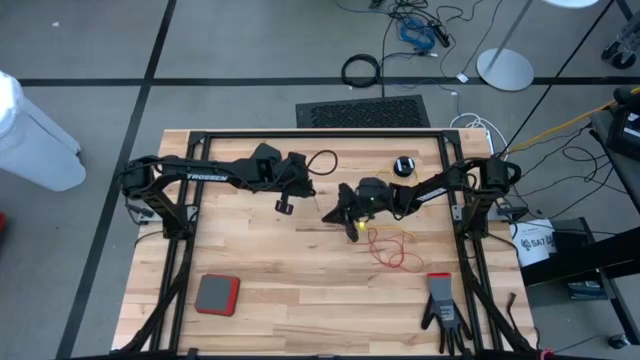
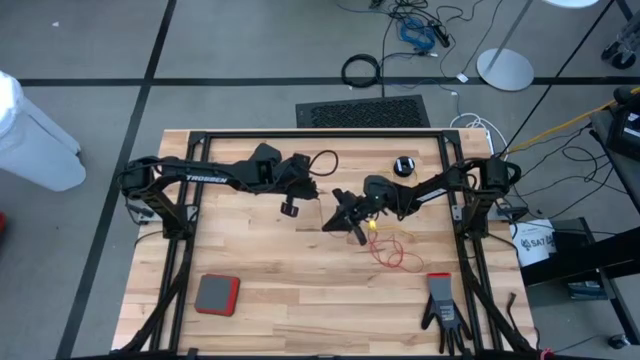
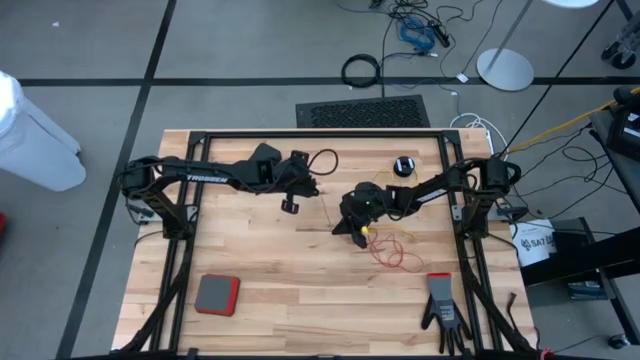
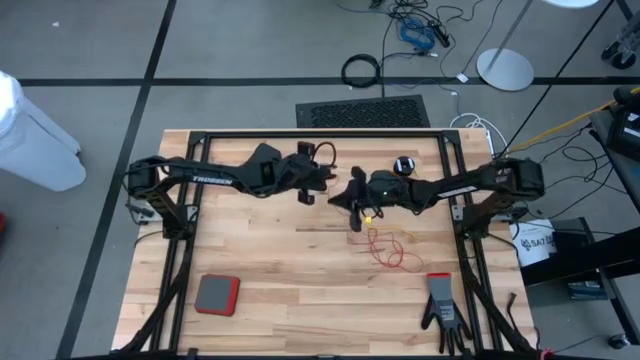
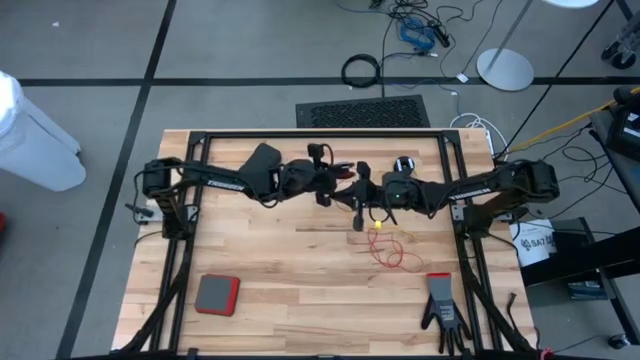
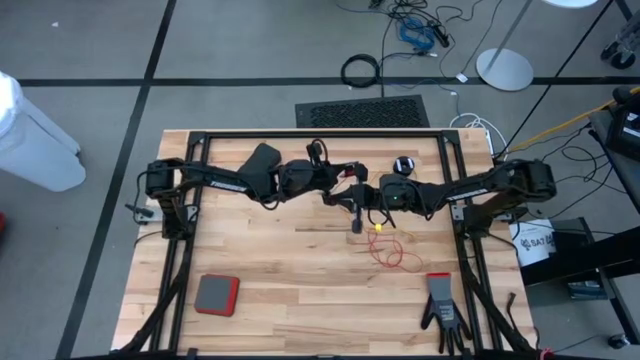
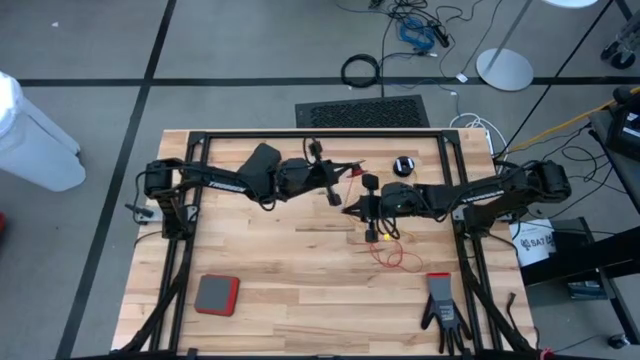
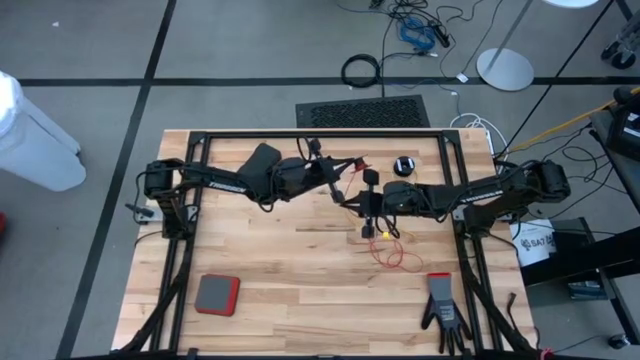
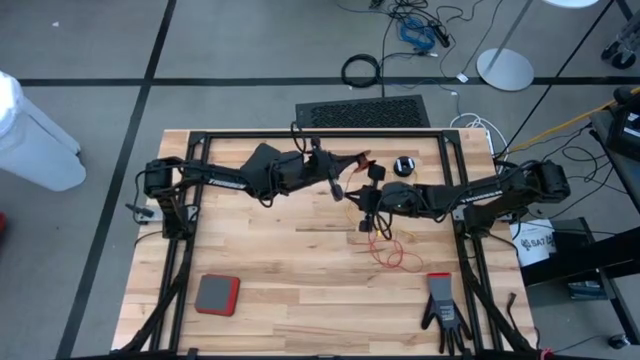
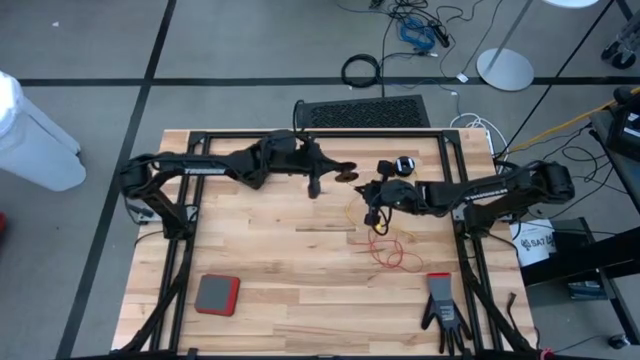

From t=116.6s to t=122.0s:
Task: Coil cords
Coil the red wire on the spool

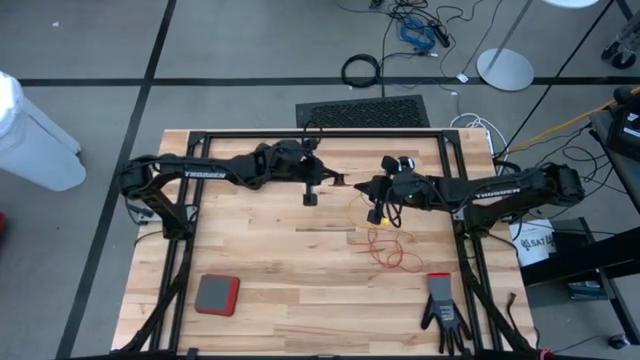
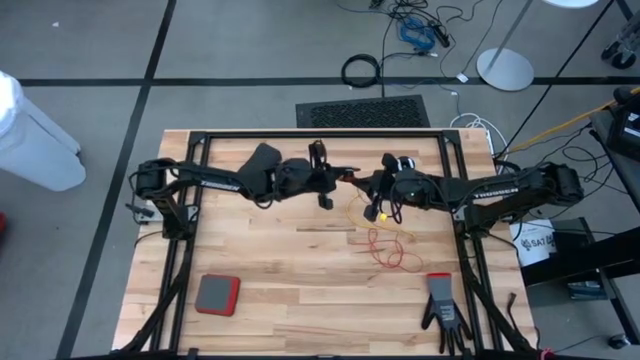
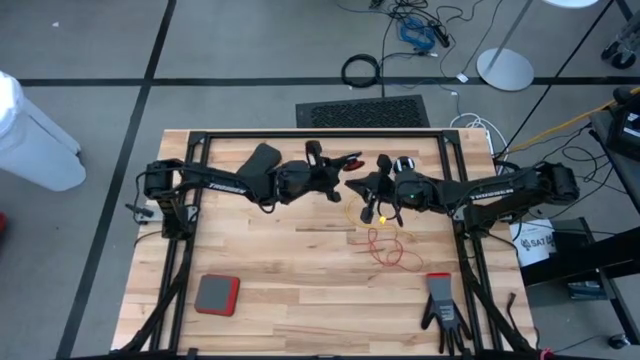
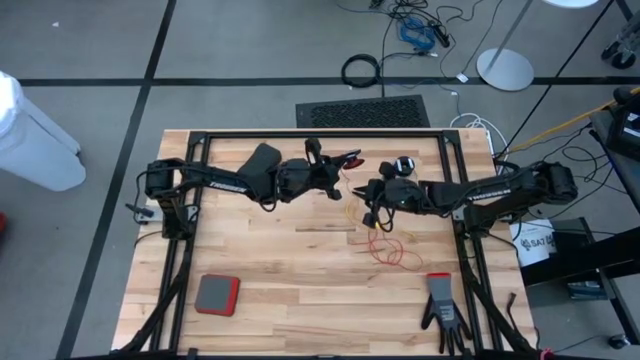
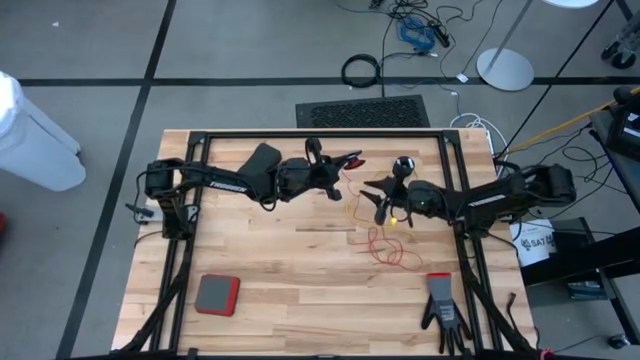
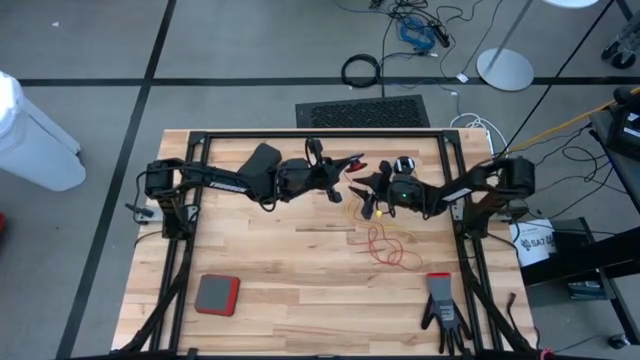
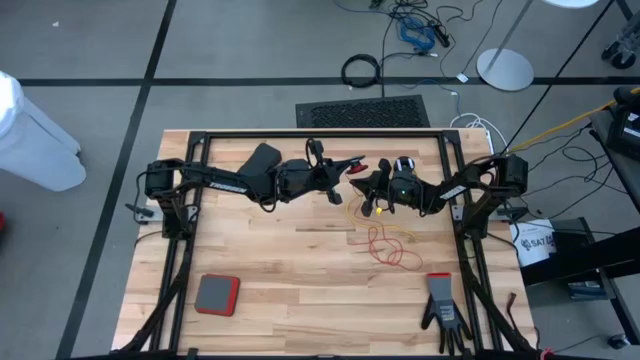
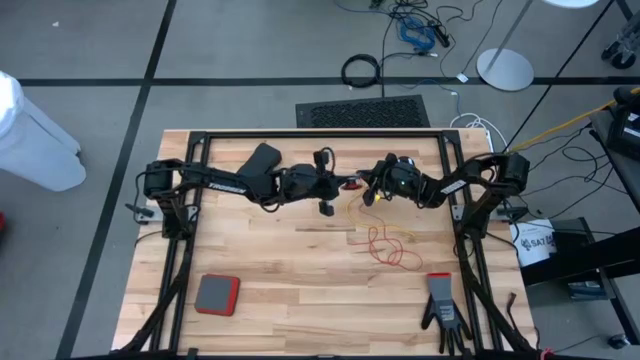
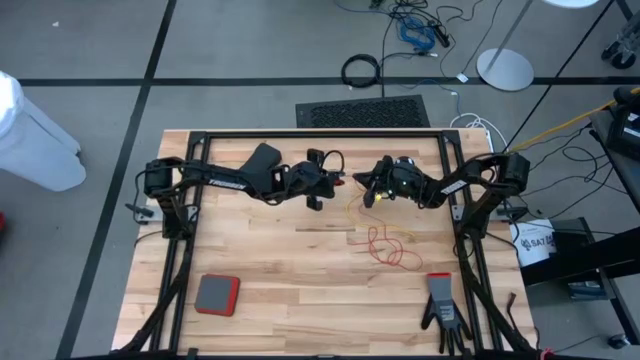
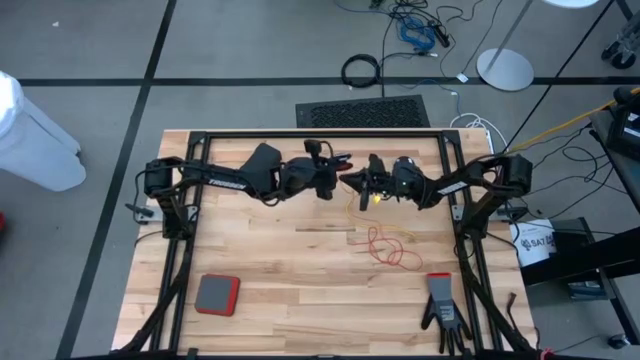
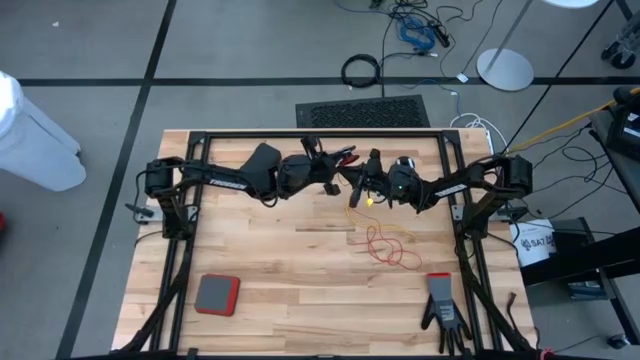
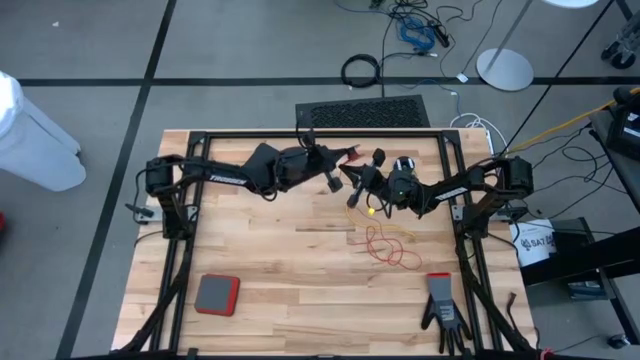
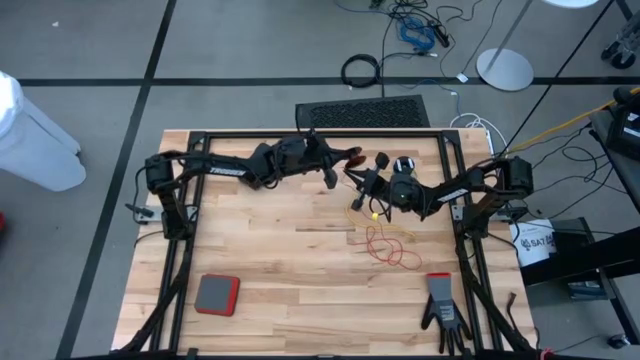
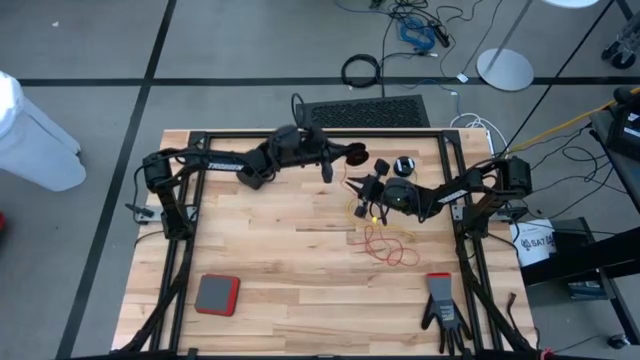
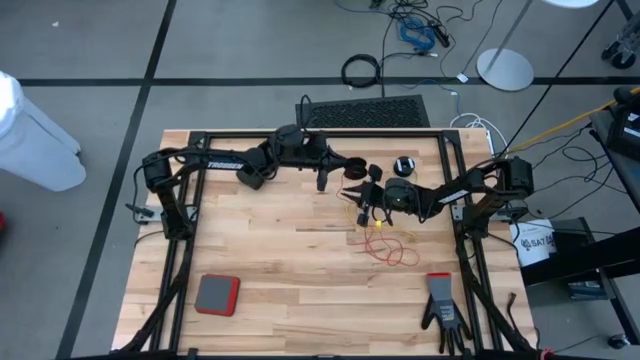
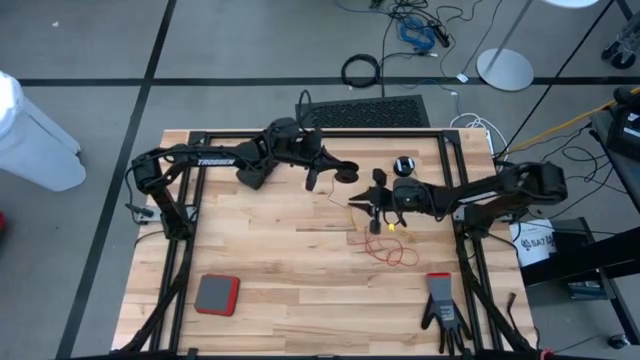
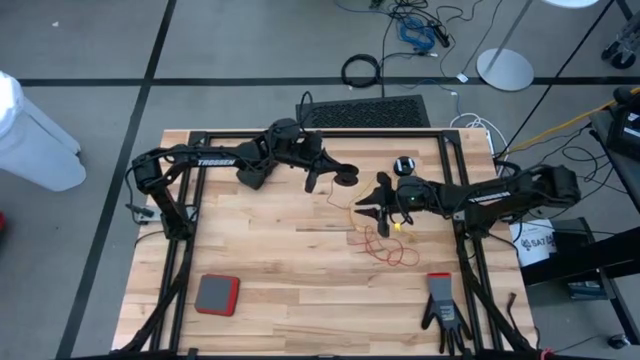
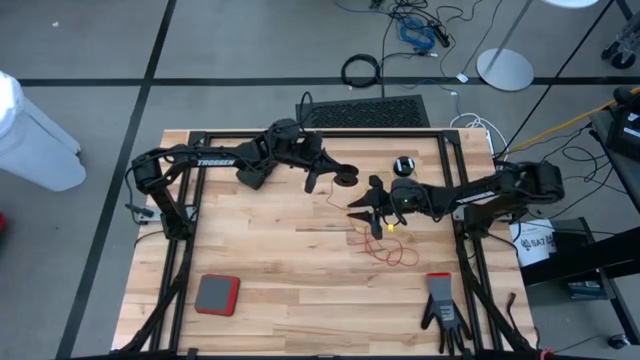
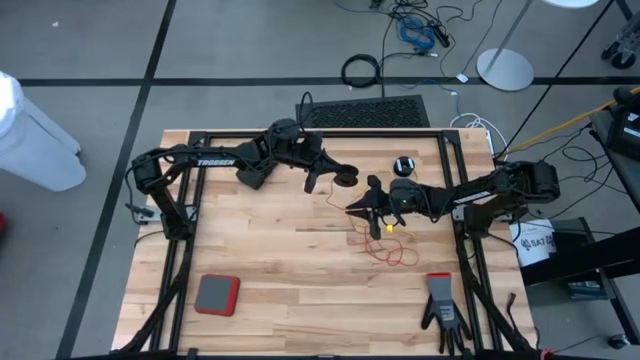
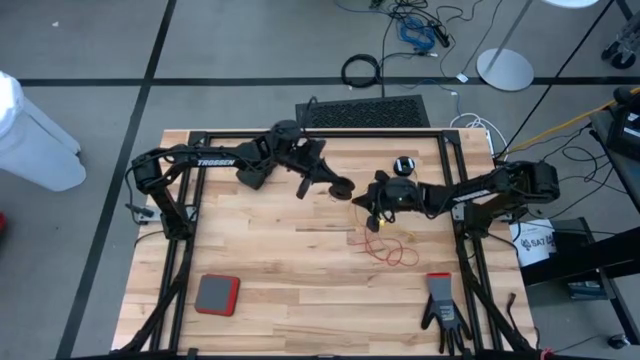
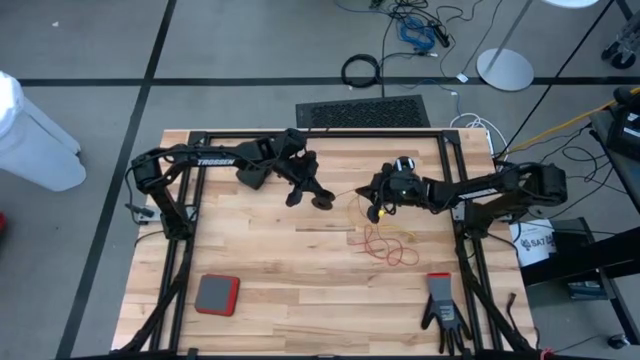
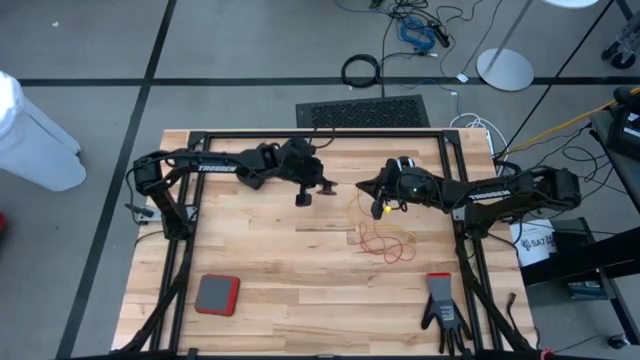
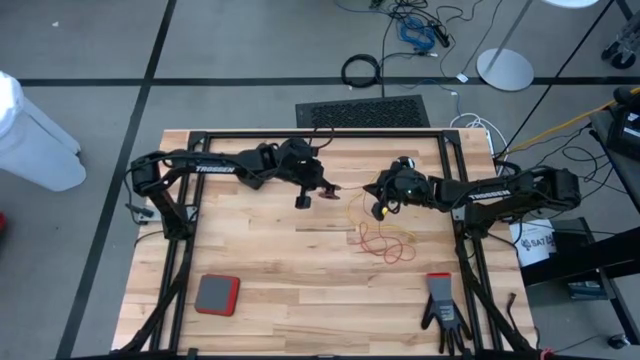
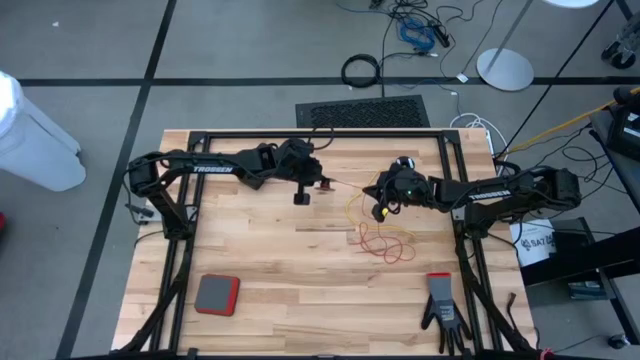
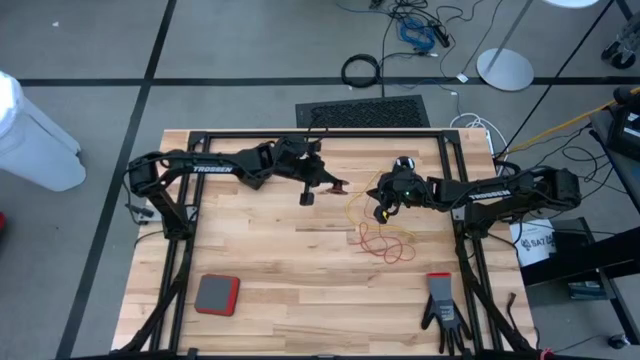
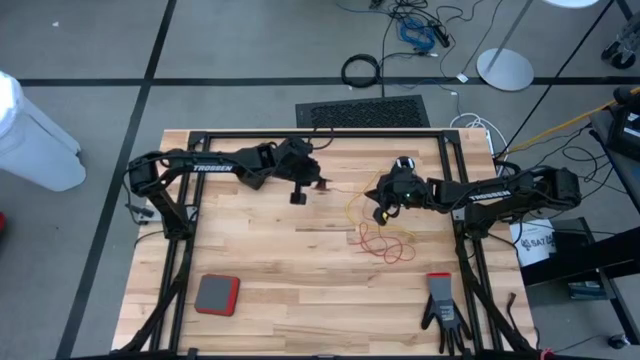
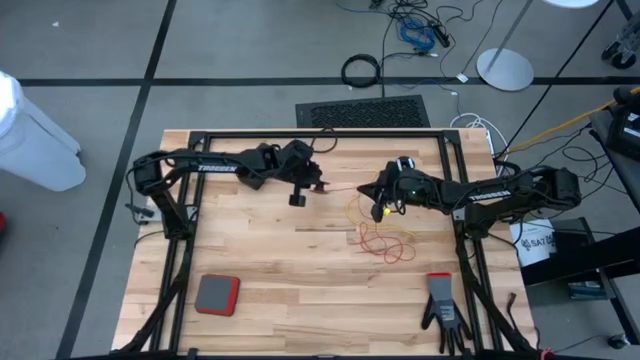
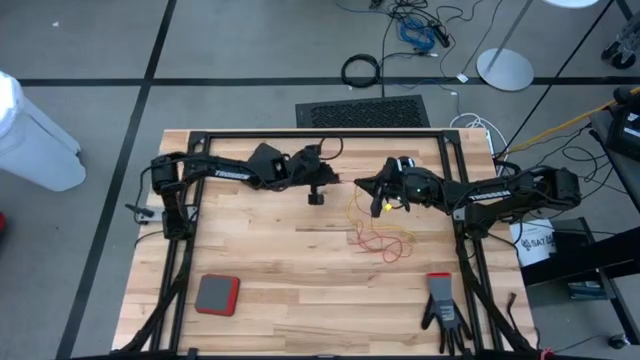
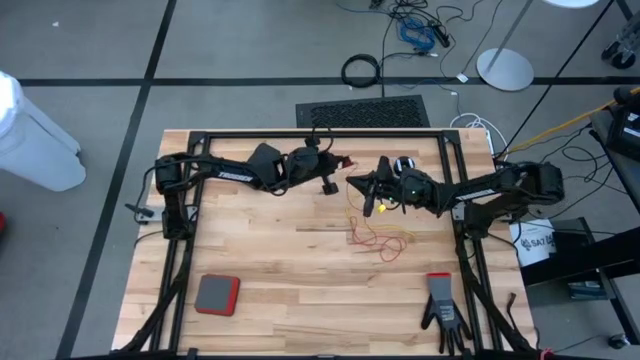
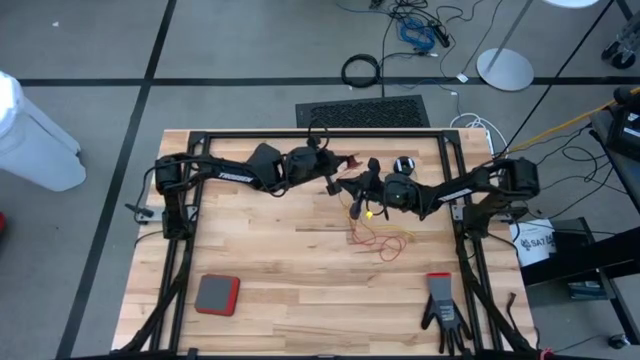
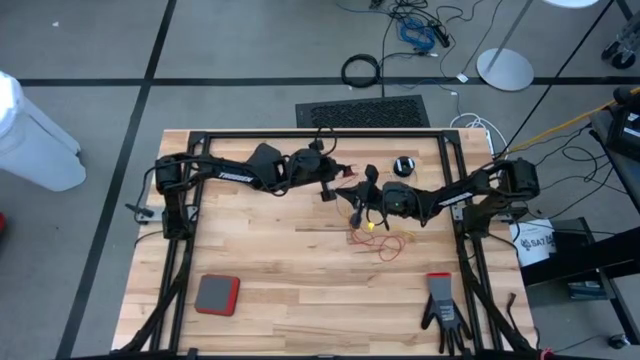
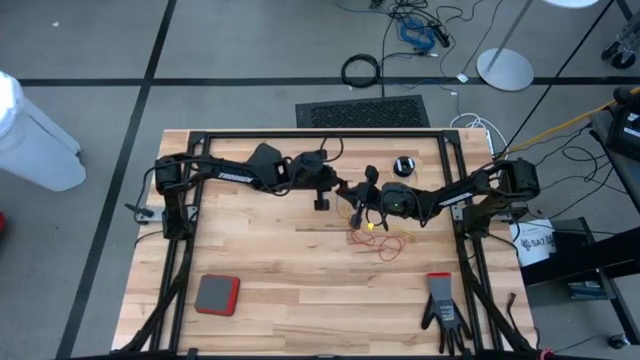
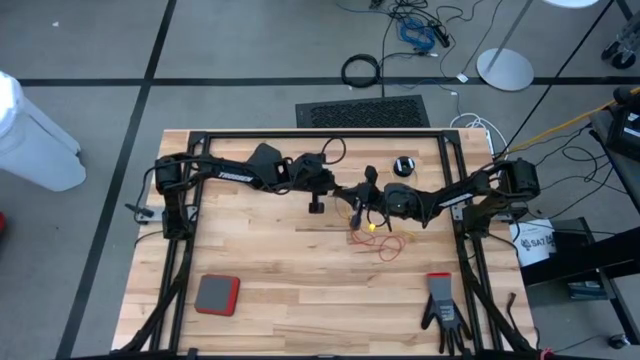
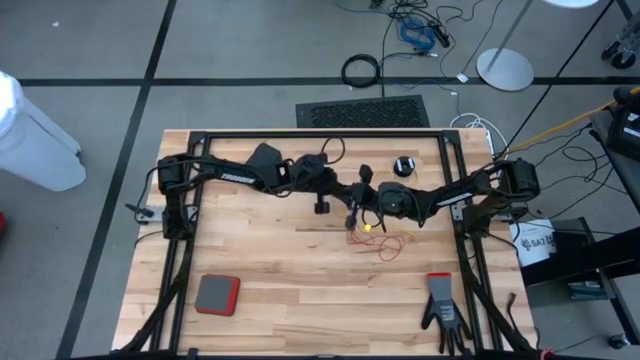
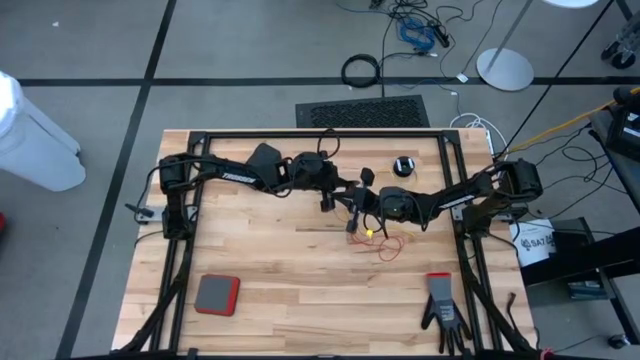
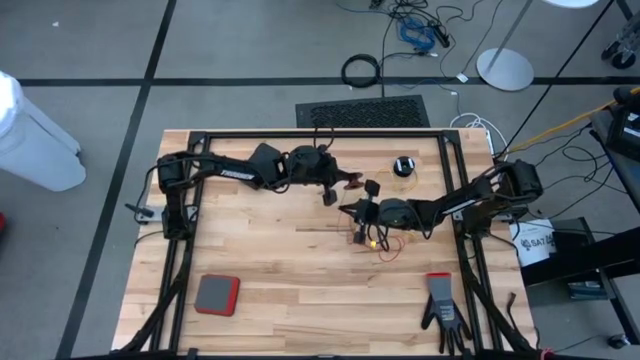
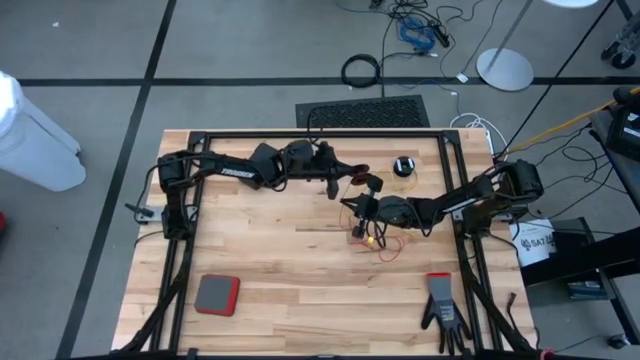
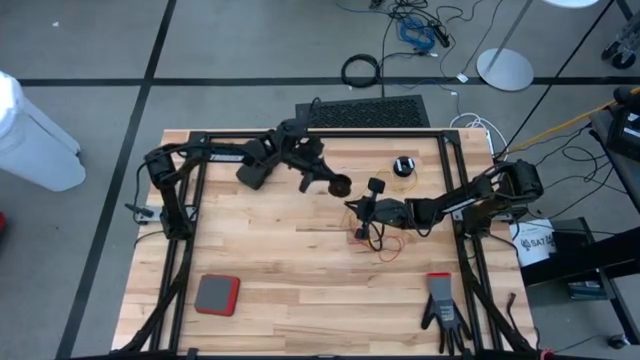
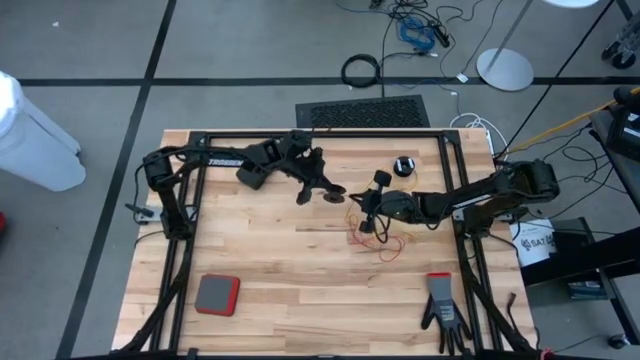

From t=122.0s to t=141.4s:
Coil the red wire on the spool
